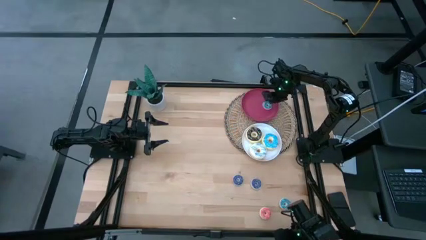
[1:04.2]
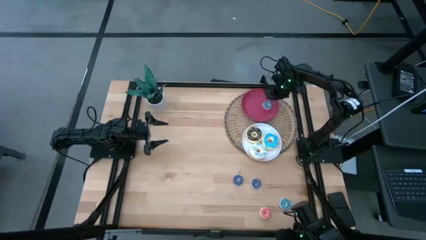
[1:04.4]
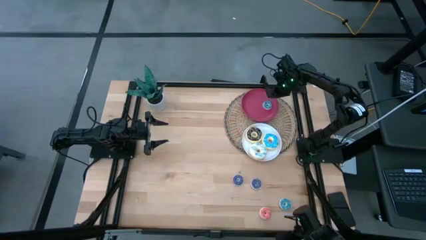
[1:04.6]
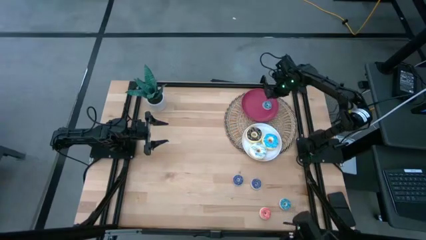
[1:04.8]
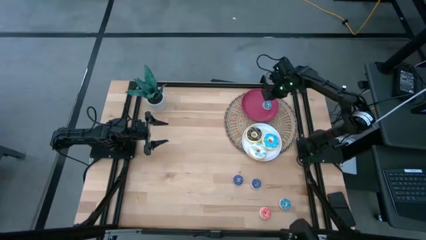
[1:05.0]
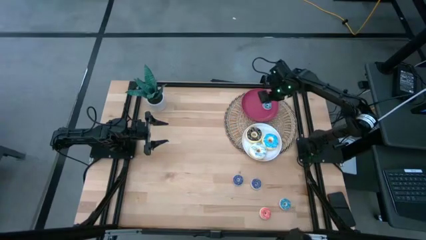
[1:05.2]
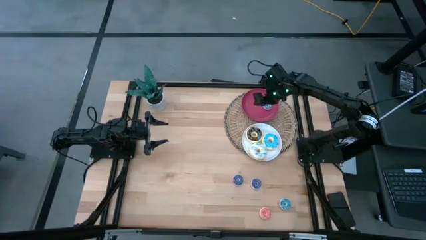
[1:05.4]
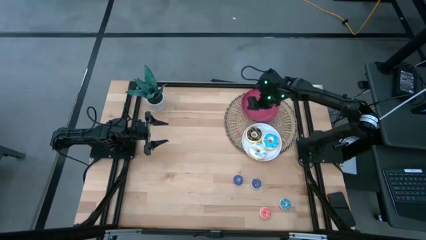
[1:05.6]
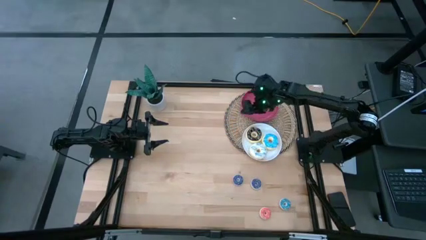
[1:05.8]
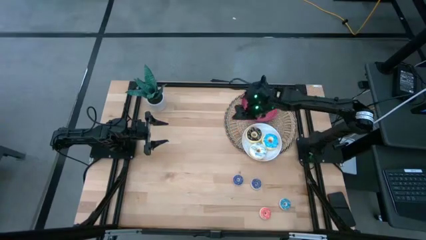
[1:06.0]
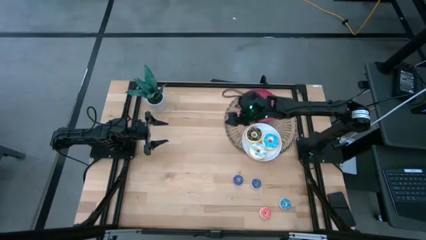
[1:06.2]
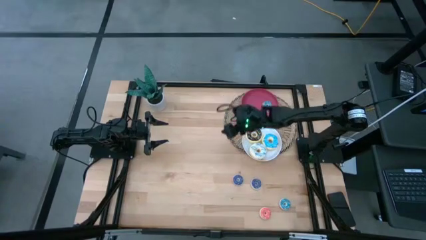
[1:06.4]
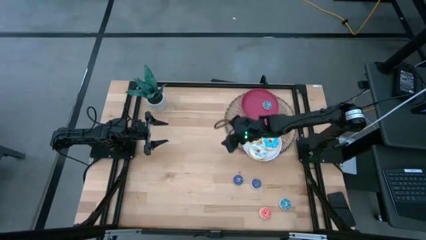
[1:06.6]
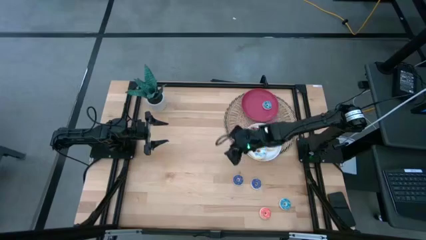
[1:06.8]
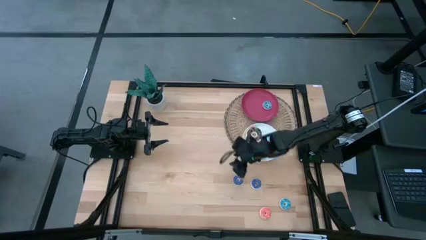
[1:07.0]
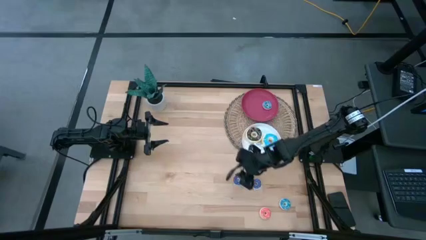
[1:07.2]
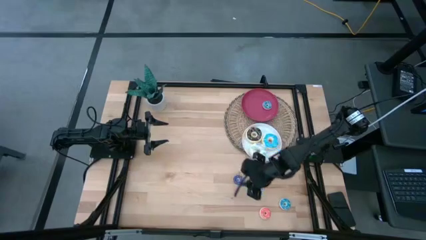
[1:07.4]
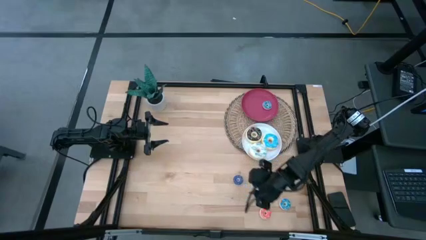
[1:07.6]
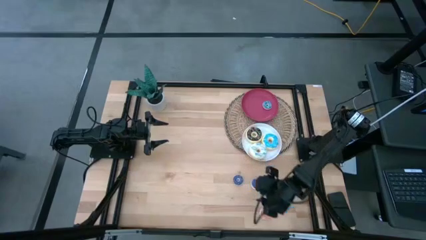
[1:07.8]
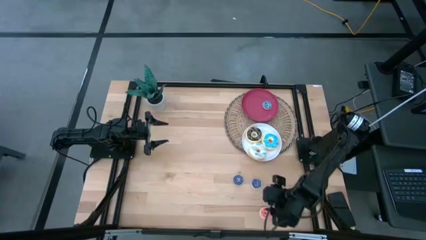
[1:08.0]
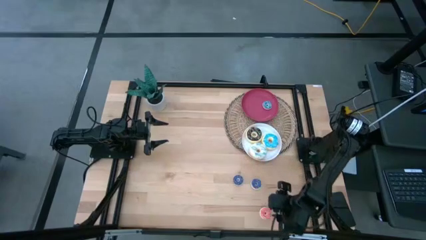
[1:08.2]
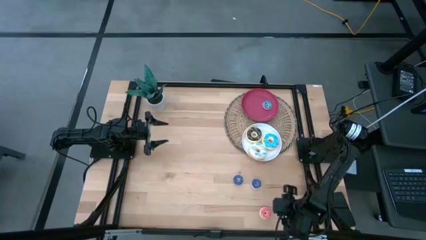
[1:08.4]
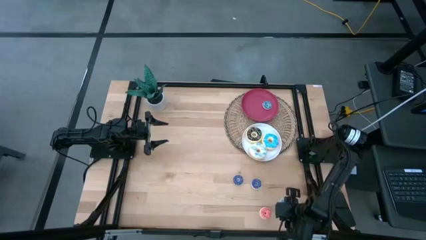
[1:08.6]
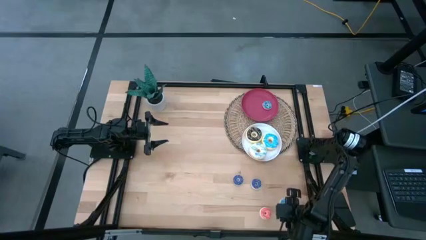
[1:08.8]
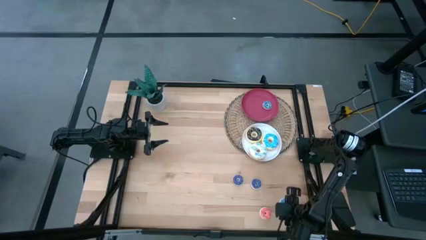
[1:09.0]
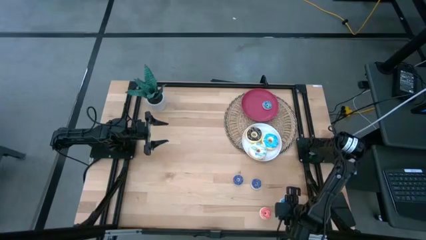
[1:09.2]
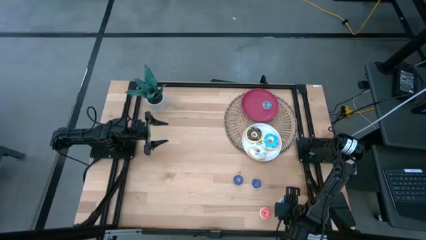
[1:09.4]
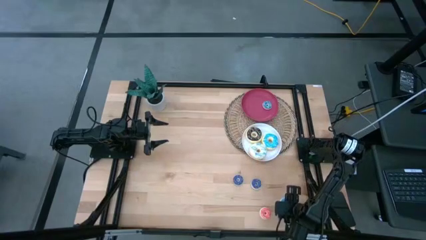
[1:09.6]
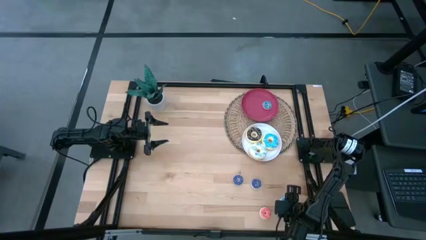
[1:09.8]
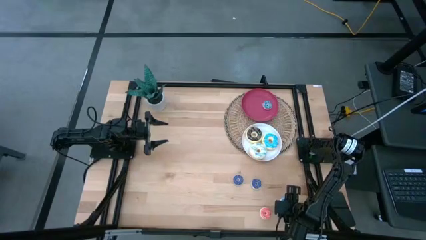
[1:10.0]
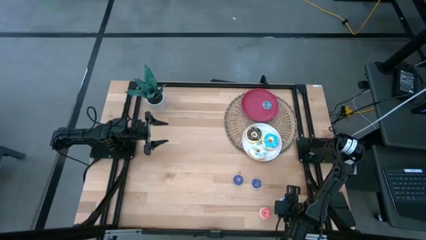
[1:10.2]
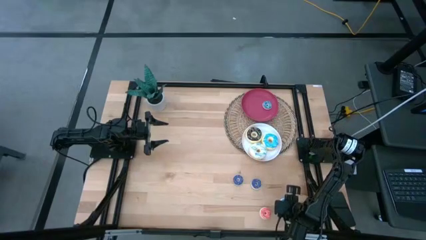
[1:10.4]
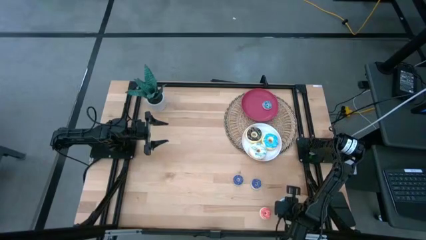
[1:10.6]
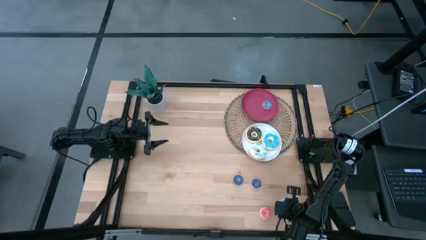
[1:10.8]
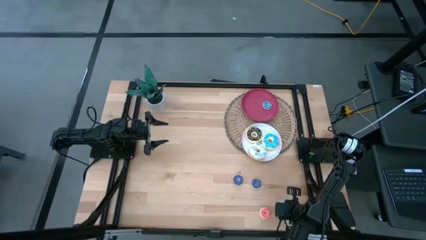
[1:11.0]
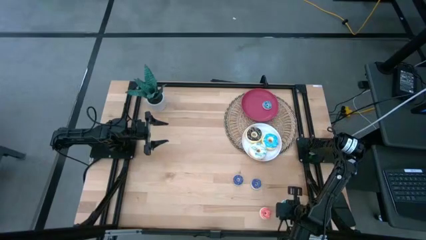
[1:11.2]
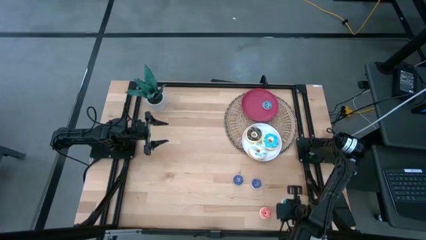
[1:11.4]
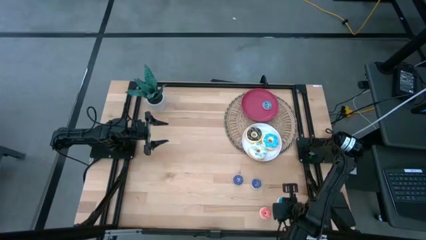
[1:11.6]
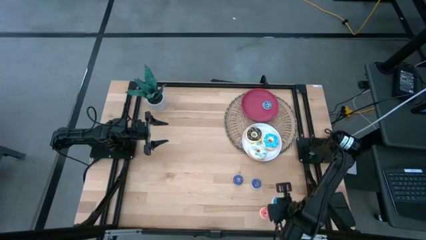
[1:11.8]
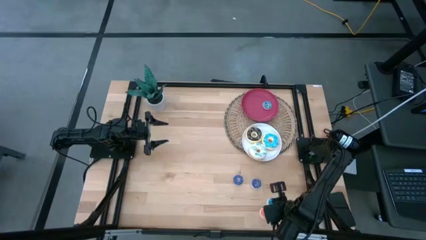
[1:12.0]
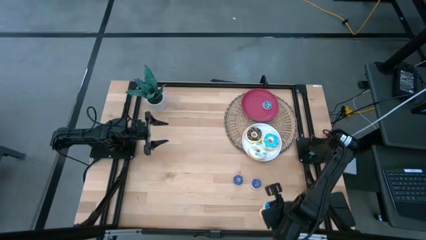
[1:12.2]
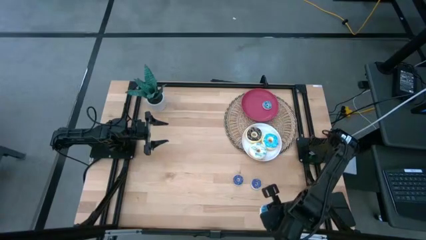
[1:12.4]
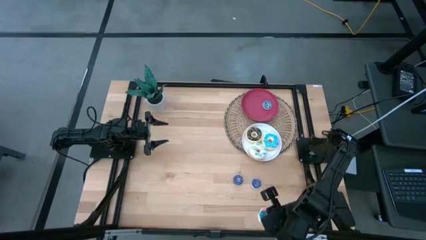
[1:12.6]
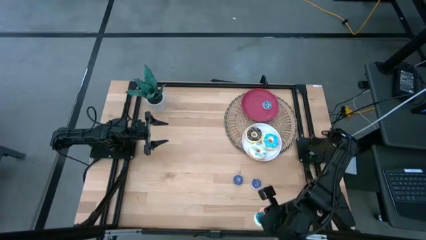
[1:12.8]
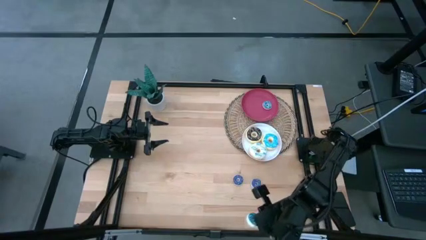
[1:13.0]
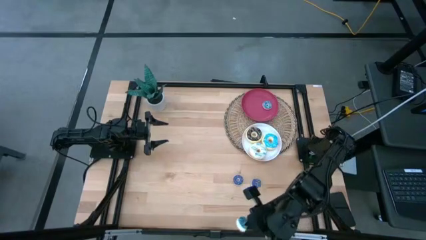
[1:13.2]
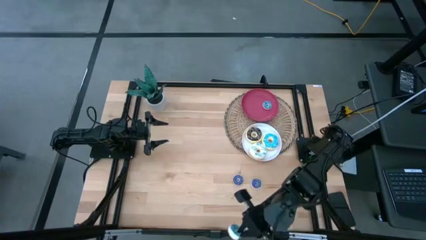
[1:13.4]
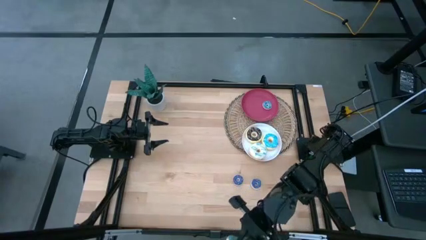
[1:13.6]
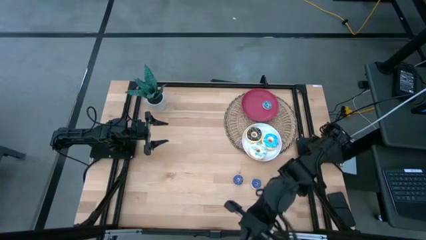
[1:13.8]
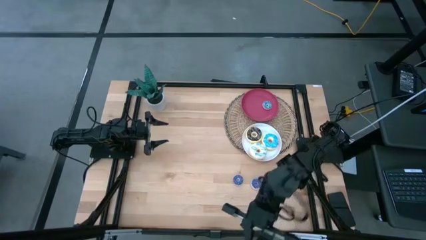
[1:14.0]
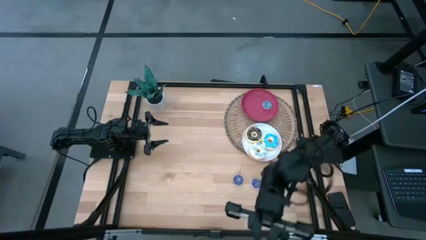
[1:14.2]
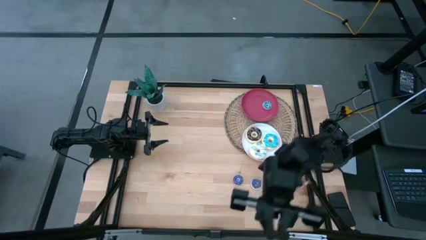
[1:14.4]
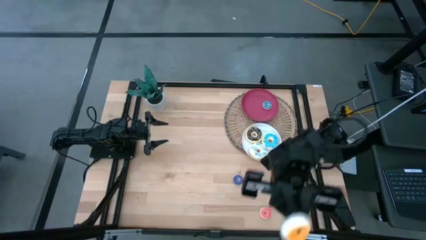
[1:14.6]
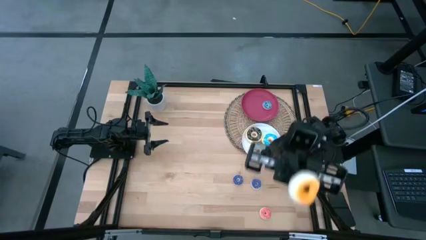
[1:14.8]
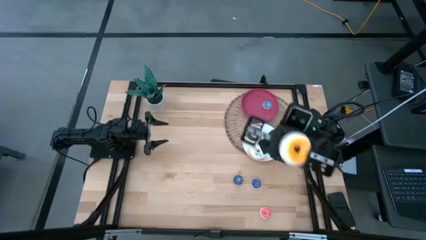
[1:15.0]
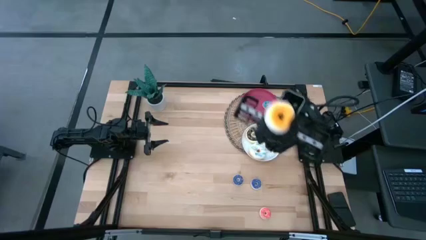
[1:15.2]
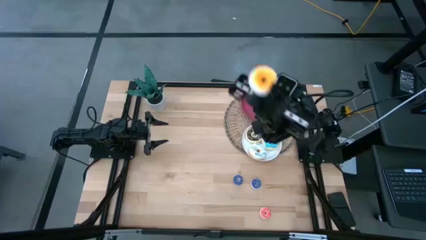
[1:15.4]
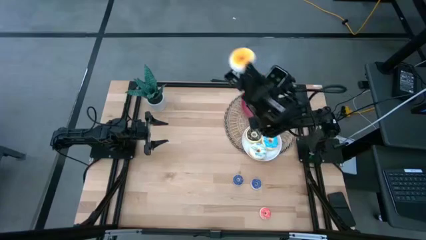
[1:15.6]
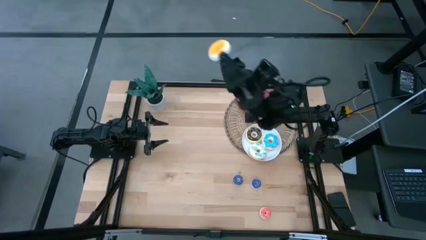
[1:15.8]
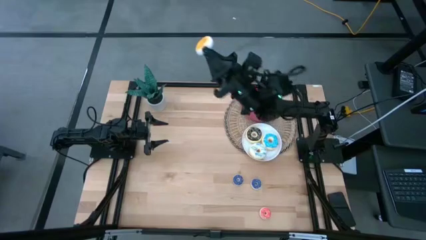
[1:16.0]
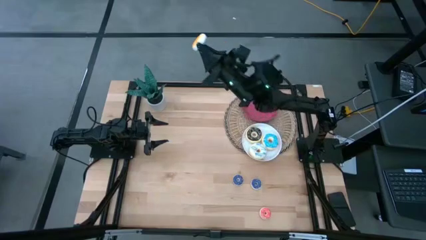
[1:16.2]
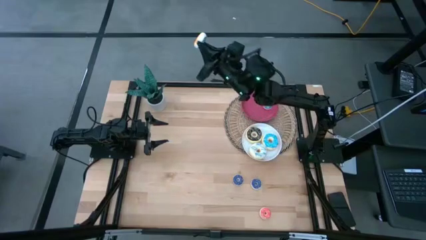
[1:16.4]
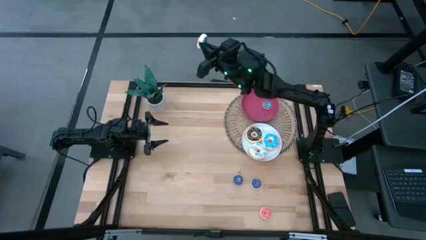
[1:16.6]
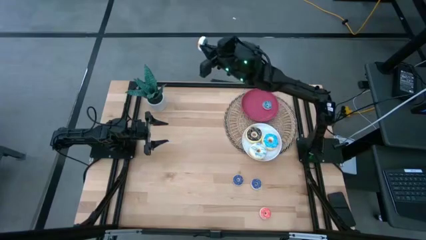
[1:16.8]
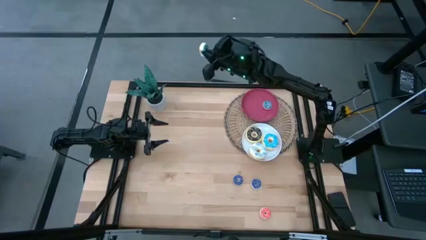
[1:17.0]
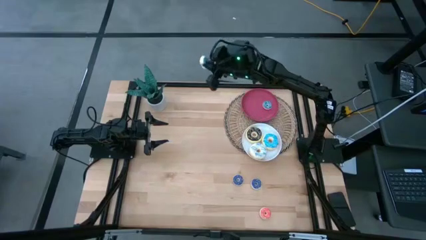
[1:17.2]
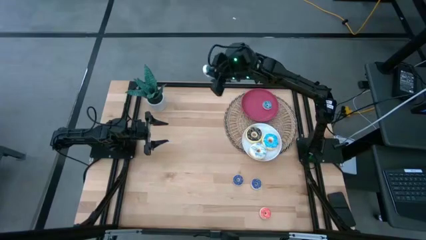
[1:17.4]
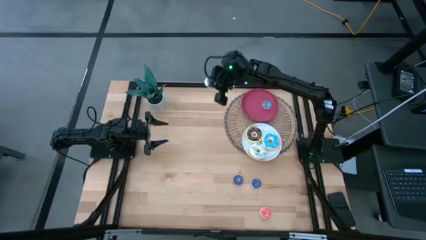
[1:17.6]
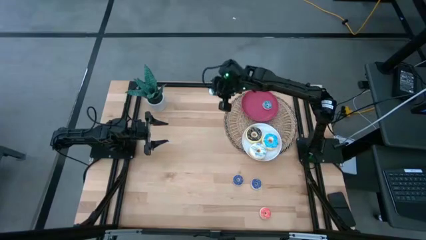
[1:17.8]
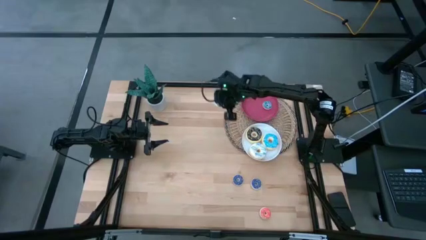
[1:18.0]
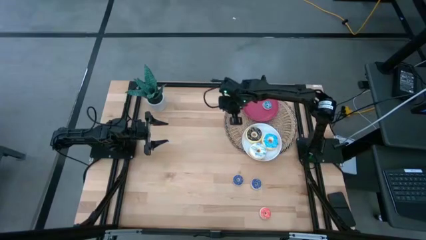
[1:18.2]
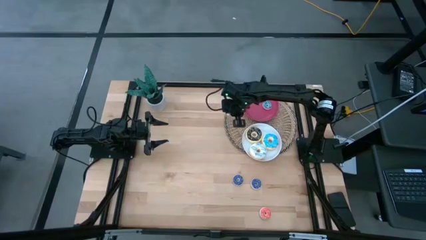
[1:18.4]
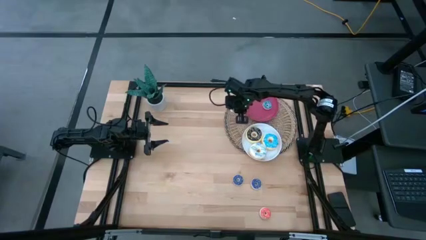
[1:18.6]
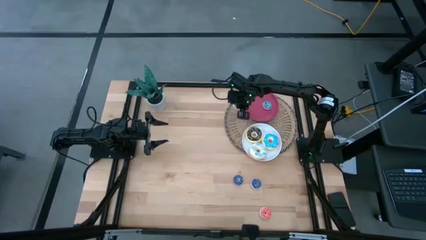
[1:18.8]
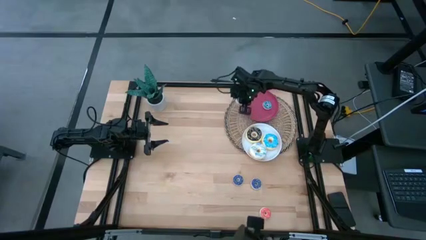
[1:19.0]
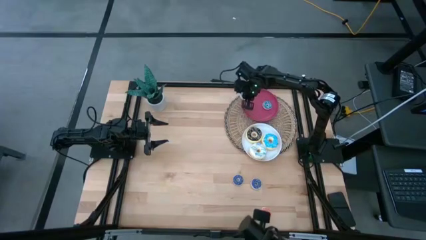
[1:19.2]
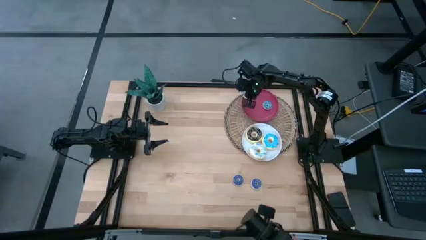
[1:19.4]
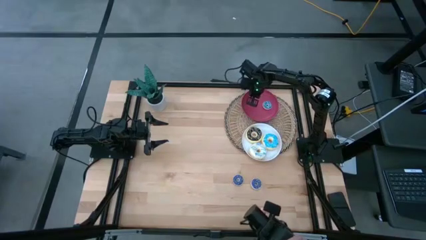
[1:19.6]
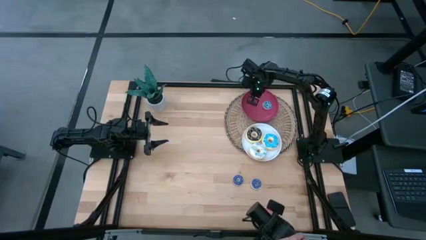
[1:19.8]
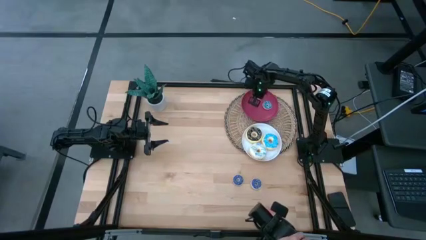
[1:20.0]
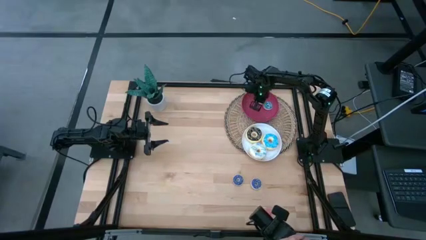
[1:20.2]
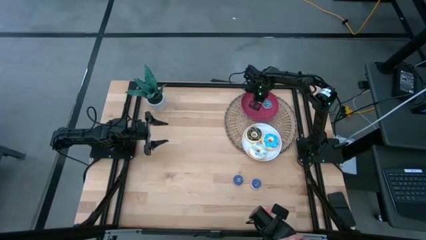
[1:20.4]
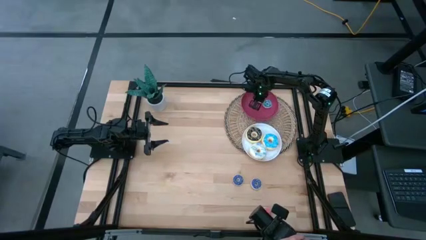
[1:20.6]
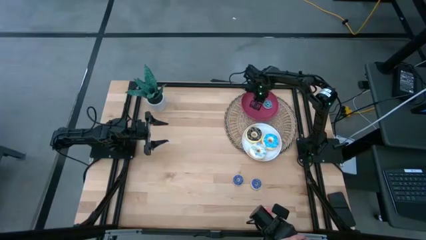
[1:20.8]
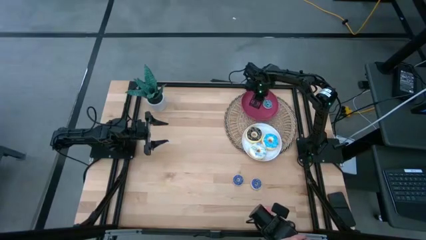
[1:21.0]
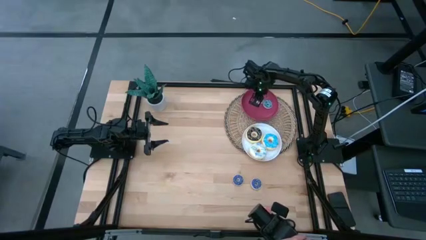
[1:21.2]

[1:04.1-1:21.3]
Task: Pick & Place donuts
Put the small blue donut on the red plate
